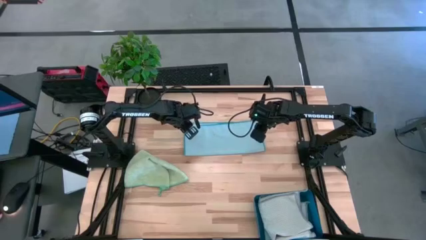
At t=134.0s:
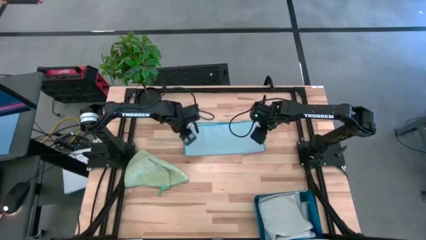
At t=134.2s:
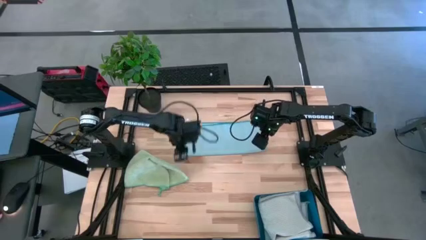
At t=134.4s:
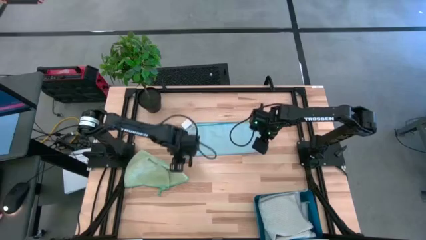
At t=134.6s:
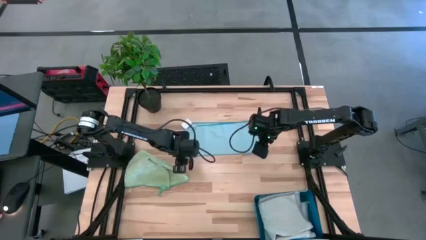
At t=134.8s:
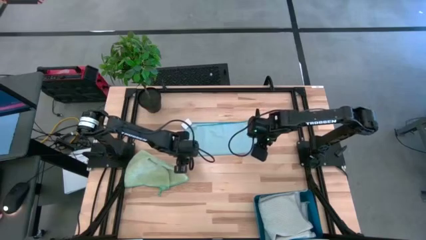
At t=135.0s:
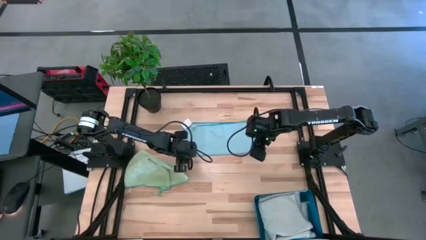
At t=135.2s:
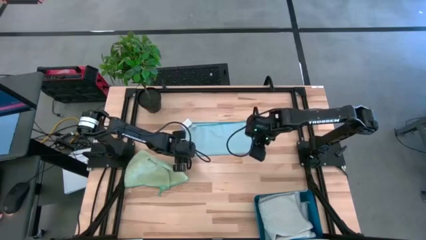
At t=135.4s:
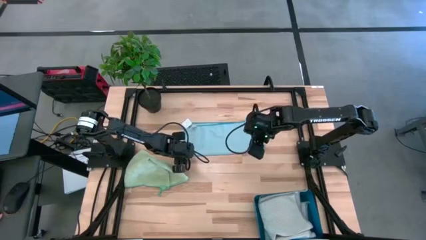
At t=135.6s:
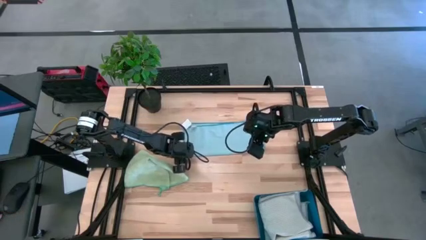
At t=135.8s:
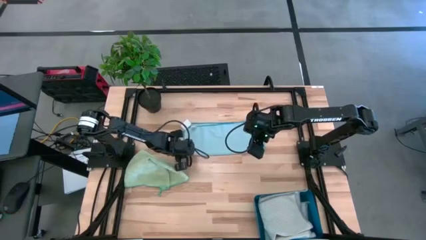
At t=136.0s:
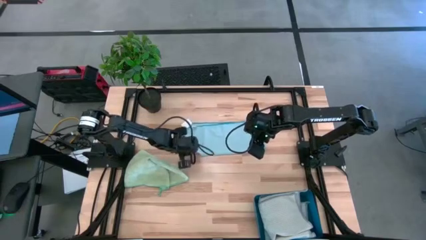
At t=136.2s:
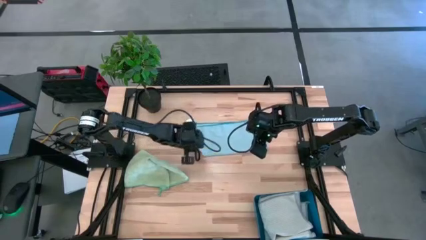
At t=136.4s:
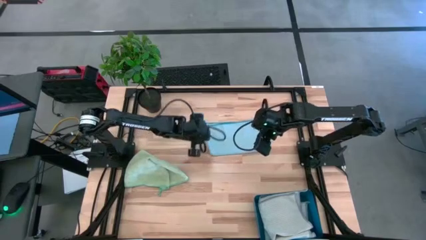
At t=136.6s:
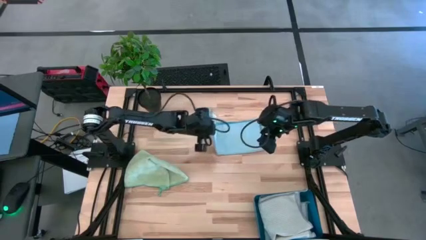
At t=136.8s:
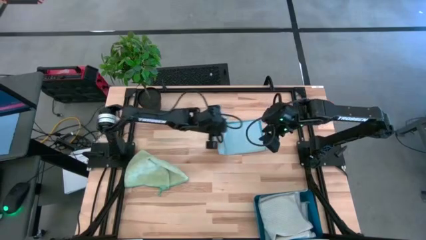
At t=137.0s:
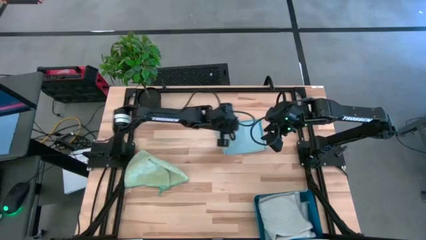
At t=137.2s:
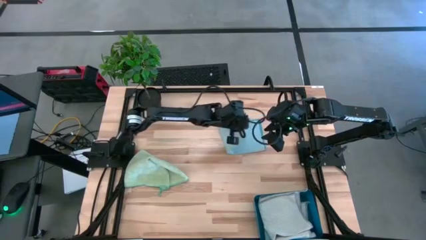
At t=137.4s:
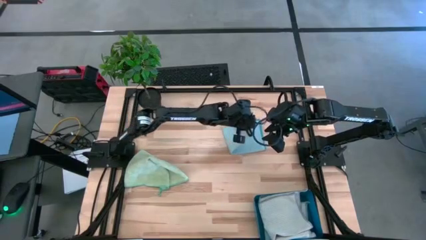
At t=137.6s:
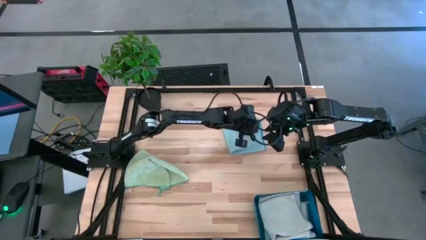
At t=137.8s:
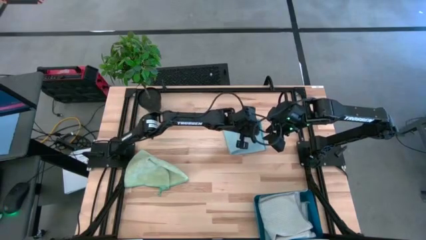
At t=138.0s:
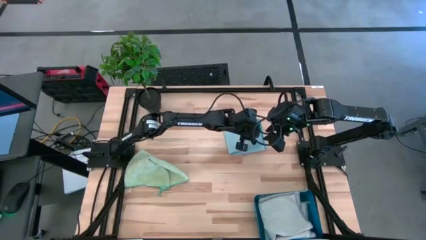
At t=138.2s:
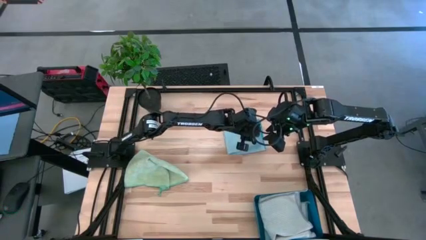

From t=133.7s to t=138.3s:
Task: Fold microfiber towels
Fold the blue microfiber cloth

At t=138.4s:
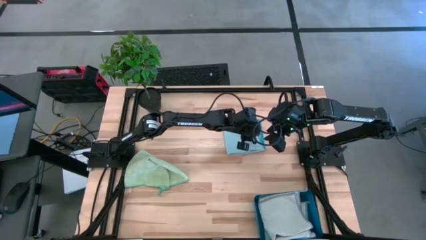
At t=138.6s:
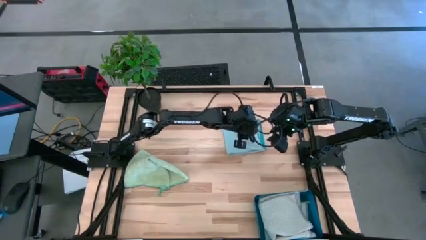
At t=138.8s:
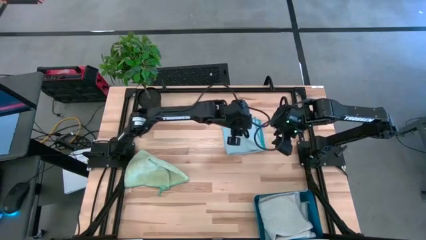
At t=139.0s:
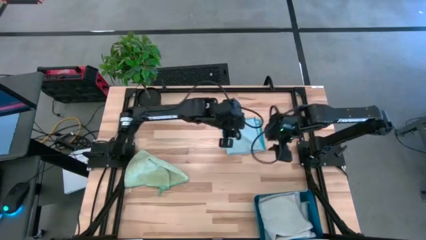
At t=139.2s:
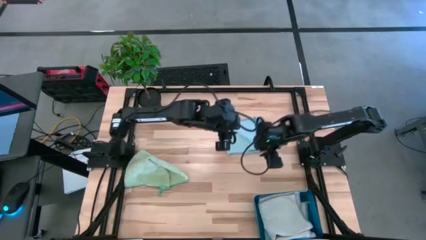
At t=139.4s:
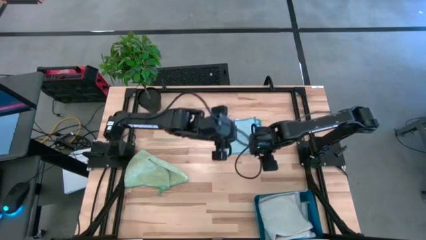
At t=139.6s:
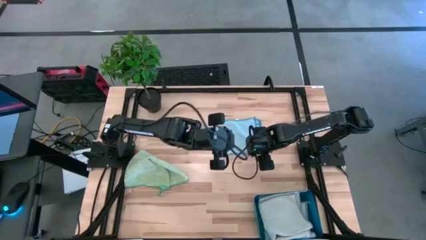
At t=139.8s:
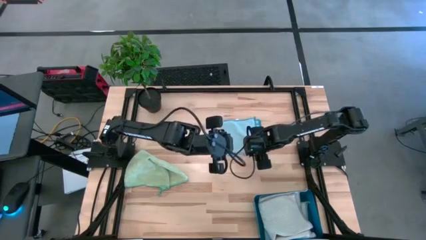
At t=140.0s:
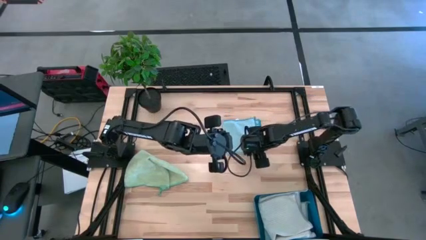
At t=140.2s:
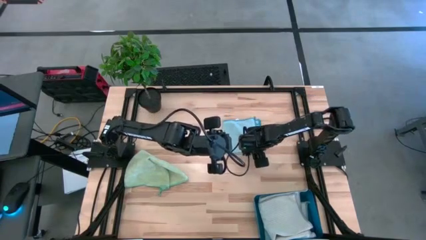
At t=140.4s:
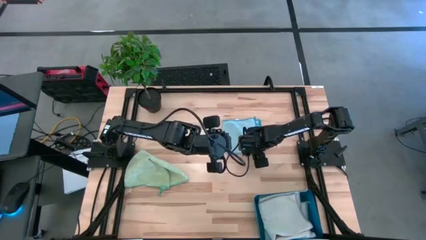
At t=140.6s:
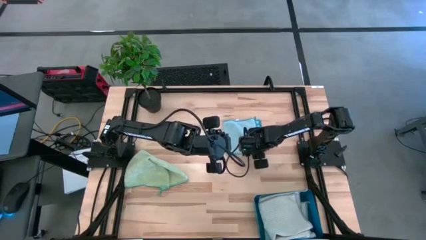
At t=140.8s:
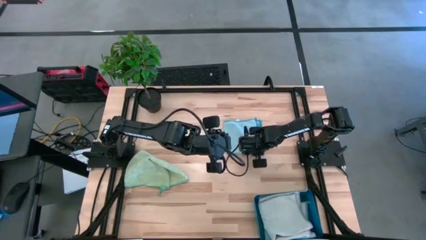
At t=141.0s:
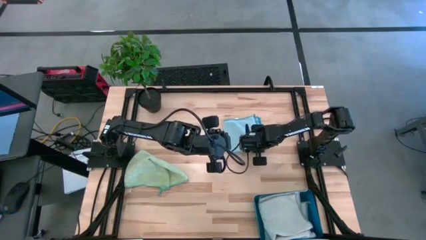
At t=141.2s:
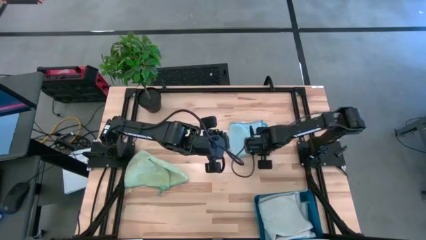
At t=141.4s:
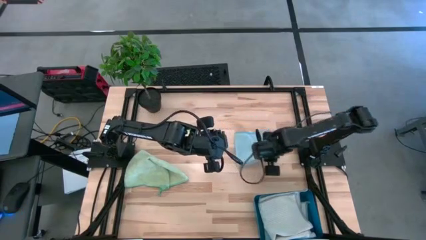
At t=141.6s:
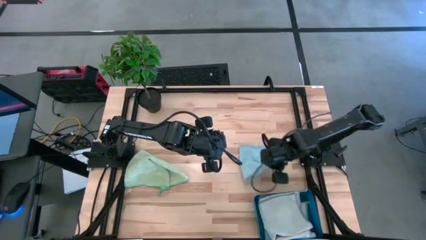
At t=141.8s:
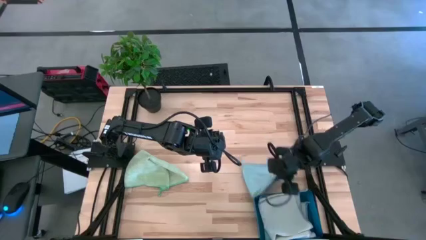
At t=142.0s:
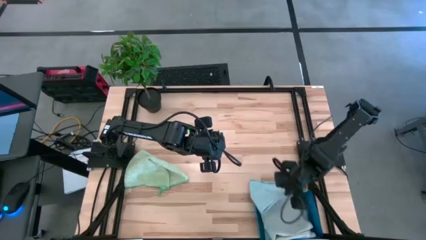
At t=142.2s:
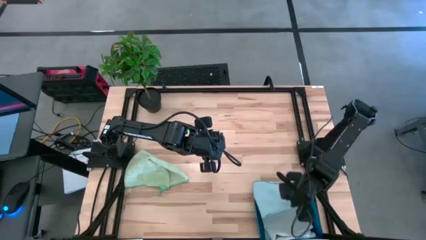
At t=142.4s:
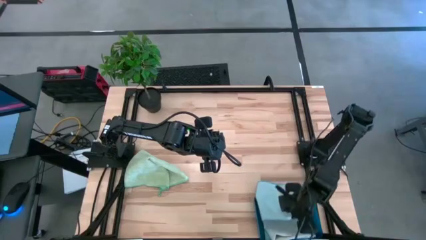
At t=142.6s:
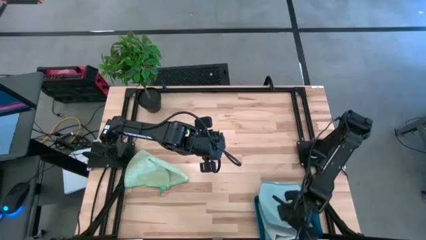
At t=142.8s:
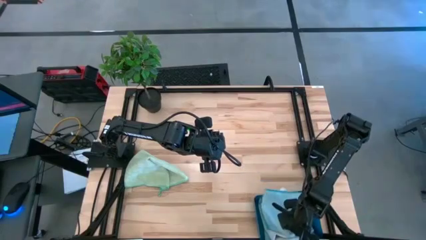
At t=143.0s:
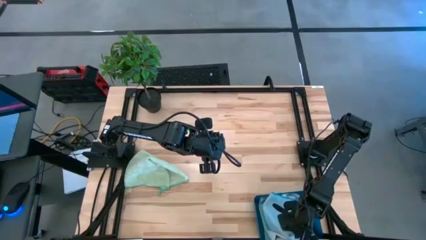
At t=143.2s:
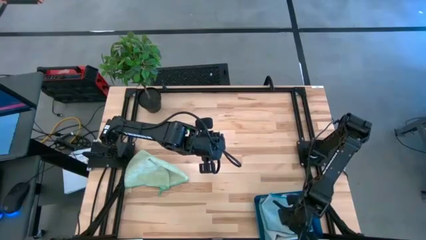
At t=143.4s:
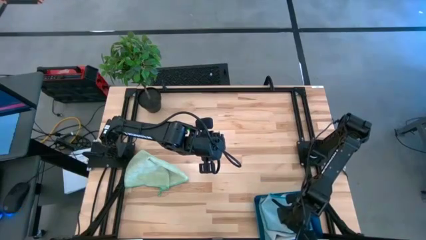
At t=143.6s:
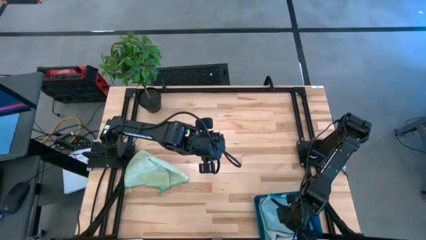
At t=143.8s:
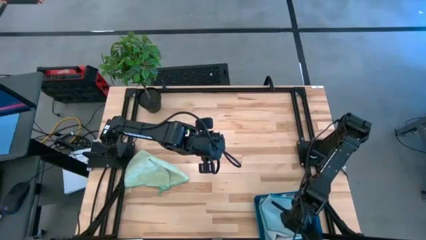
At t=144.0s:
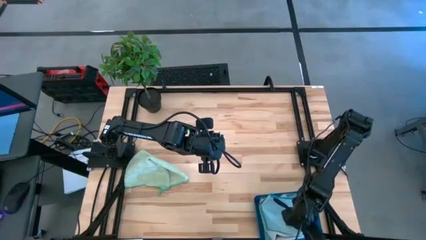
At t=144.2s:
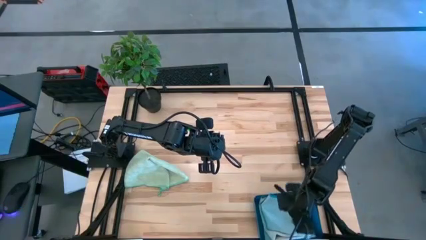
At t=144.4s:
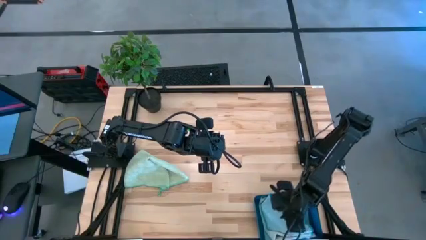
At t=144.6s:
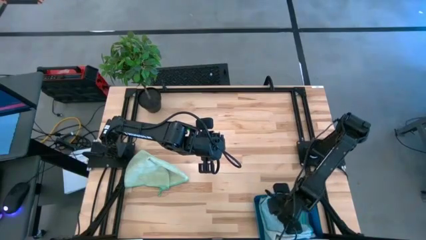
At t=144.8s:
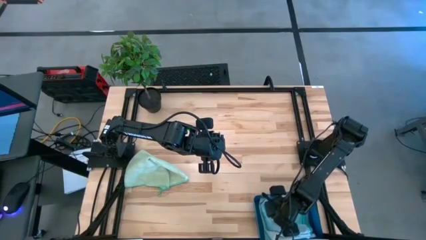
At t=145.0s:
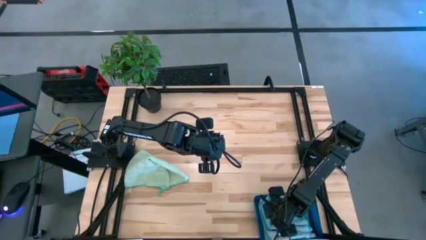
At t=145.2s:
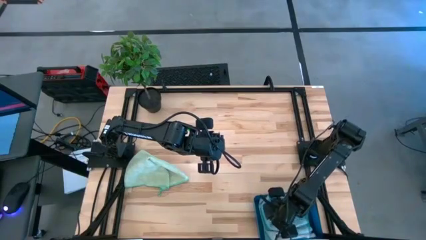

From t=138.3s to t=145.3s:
Put the blue microfiber cloth into the bin

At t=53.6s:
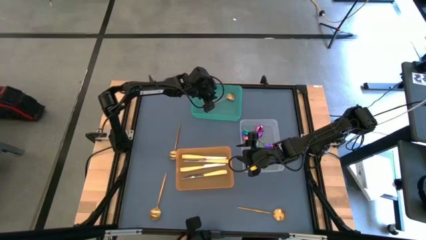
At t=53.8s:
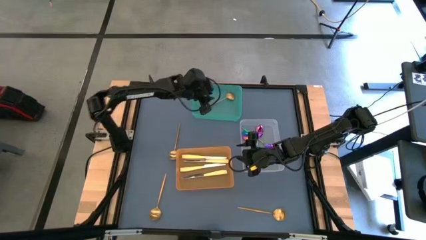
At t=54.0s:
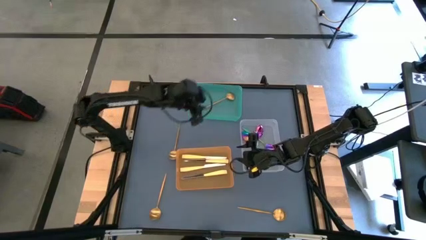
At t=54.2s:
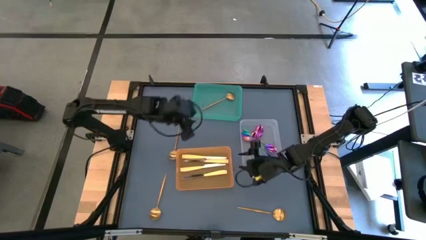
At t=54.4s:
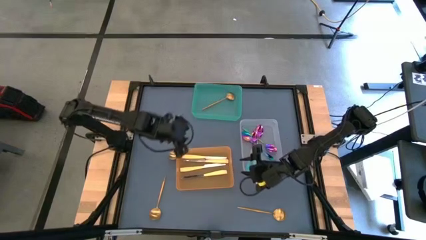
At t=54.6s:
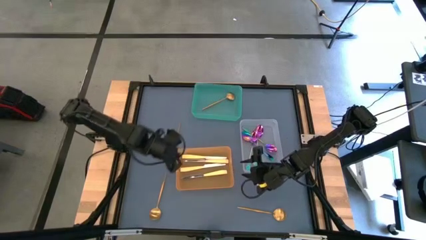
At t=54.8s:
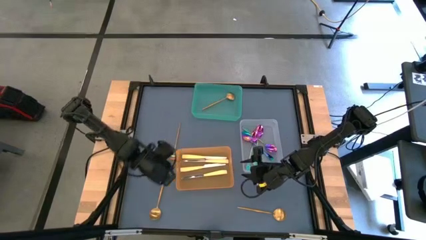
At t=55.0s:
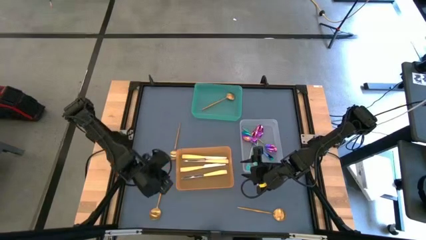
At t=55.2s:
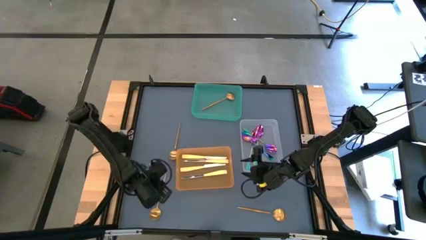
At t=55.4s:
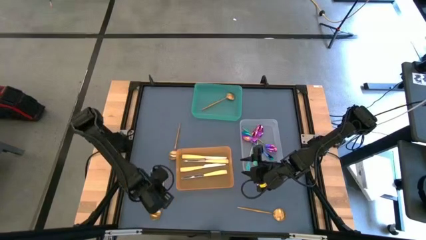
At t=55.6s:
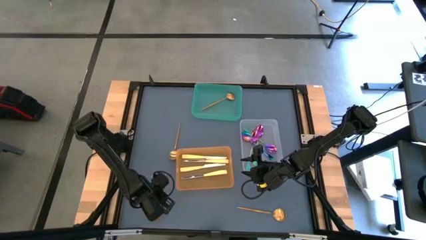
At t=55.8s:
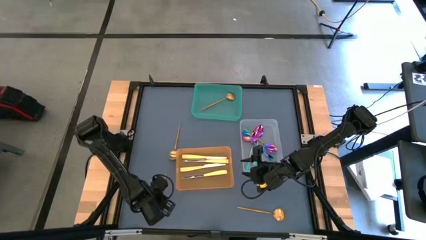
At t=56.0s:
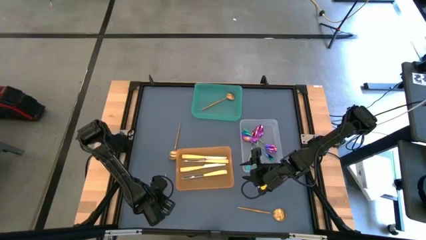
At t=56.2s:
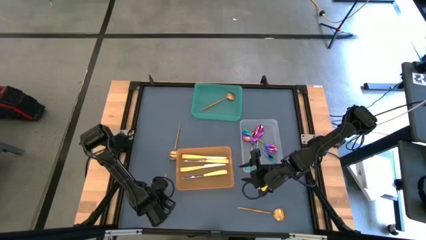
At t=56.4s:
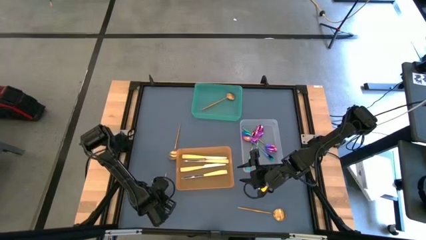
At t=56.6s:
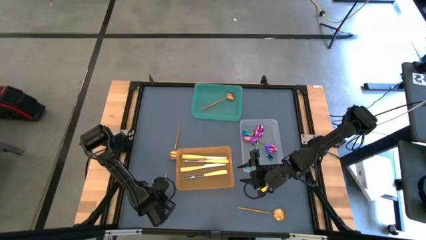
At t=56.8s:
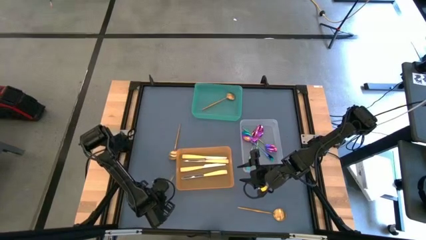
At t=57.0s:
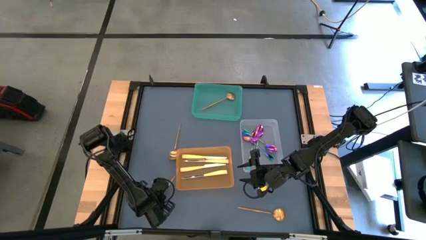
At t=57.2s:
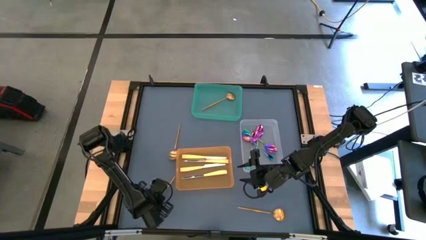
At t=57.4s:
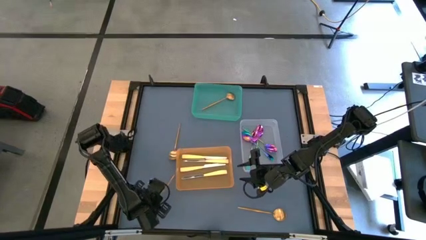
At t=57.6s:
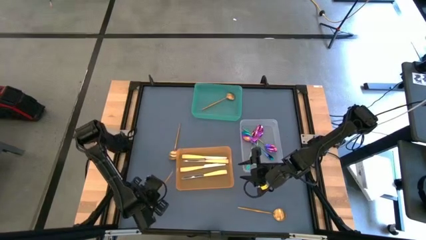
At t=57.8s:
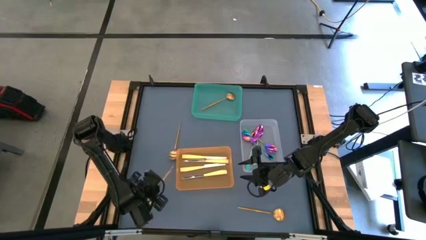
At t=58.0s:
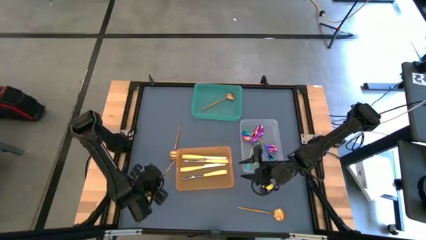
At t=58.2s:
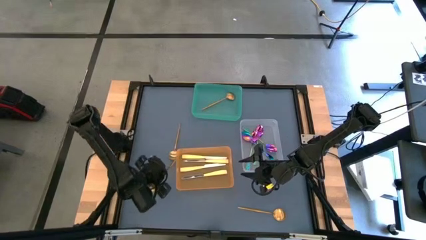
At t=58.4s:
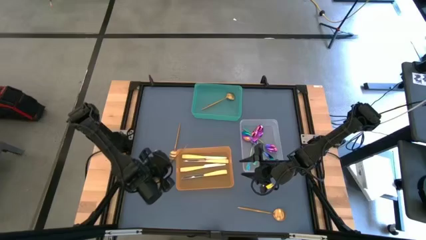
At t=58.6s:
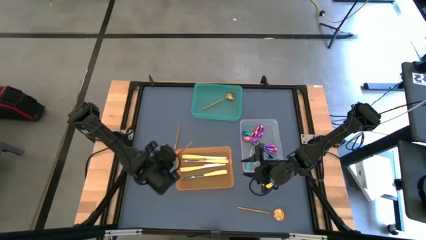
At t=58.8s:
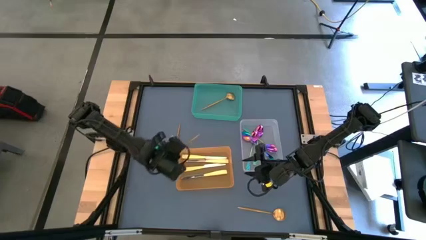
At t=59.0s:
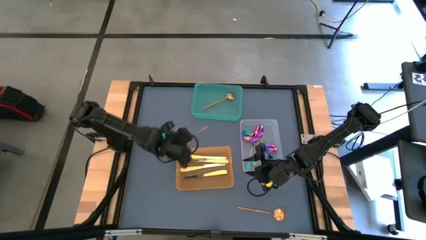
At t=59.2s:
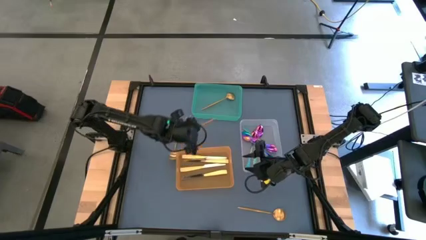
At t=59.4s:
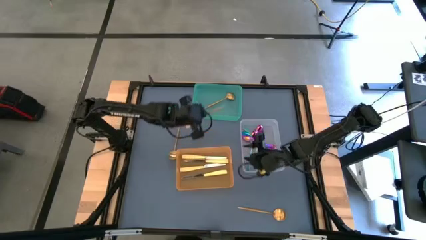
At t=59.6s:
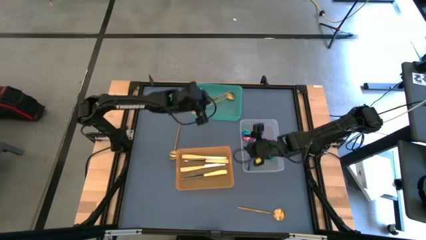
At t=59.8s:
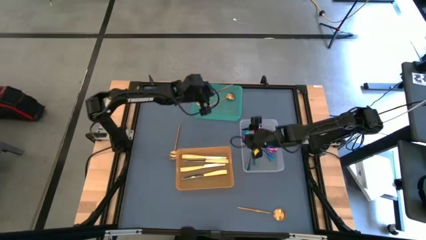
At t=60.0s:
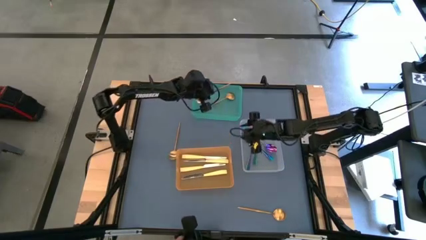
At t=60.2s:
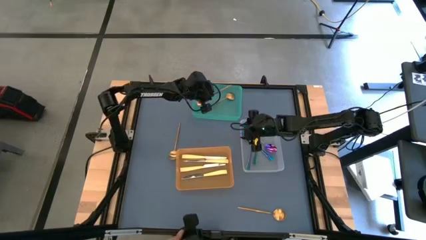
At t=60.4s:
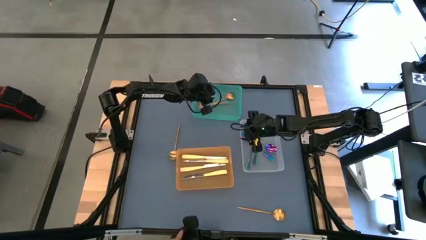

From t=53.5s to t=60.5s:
Task: Sort silverware by color (type)
Put the gold spoon into the green bin
